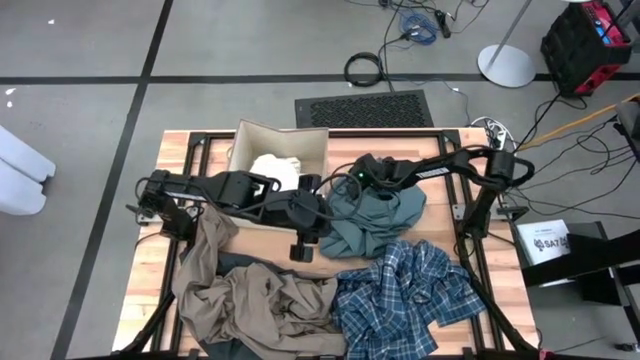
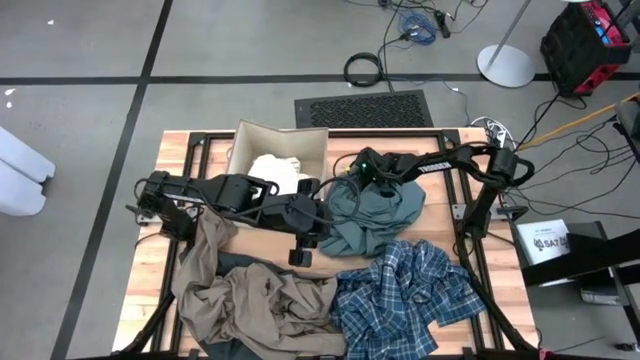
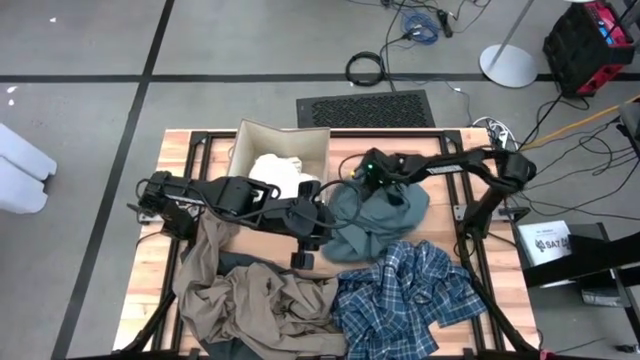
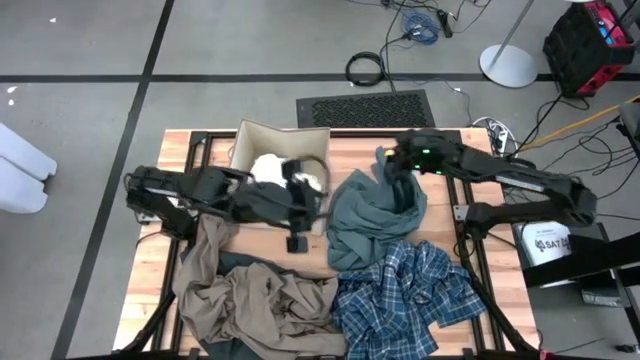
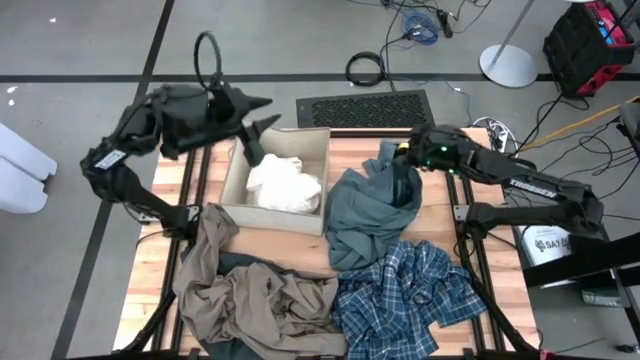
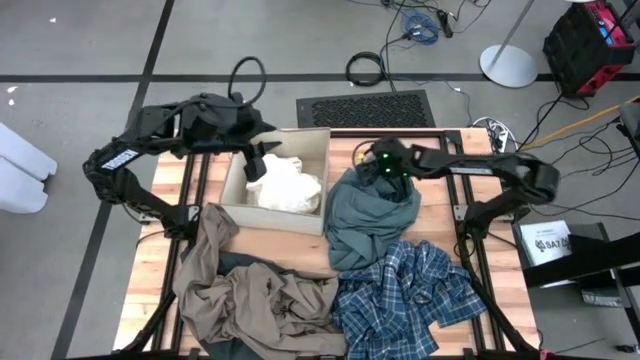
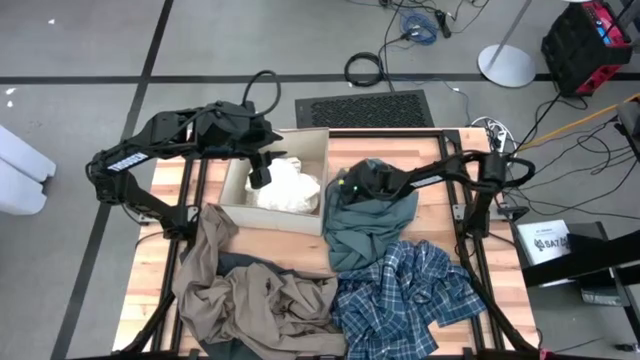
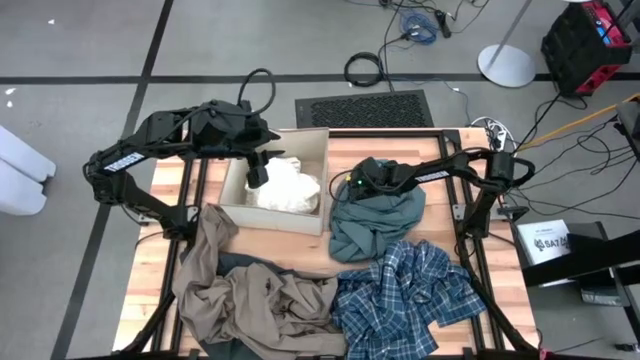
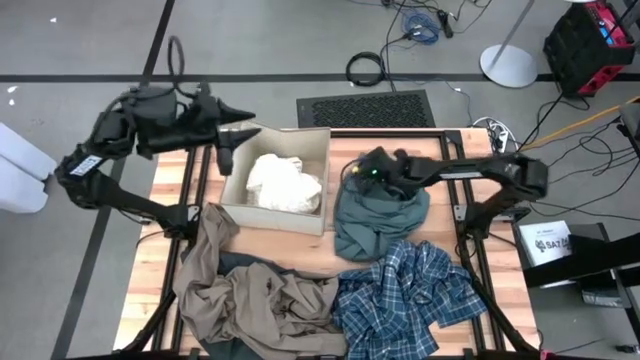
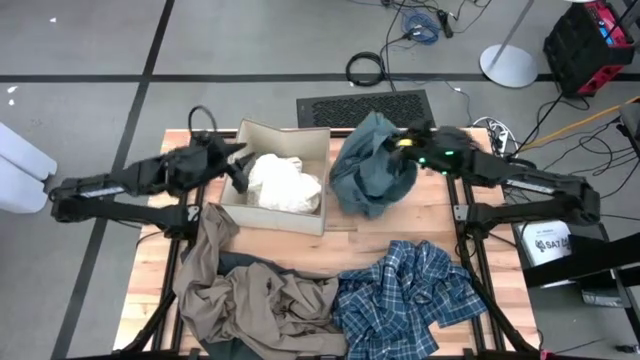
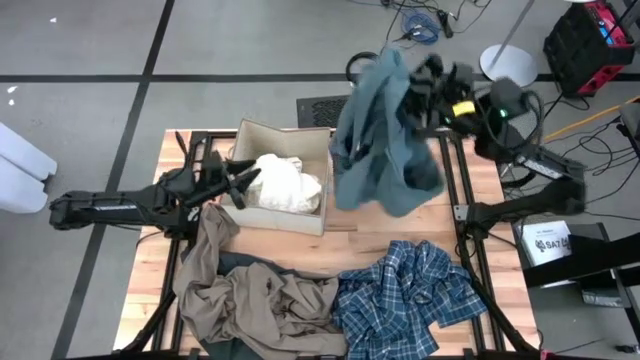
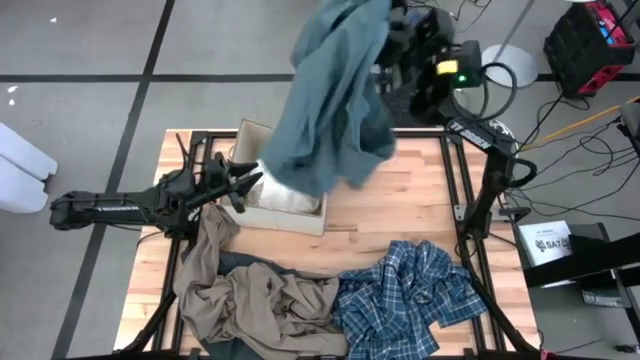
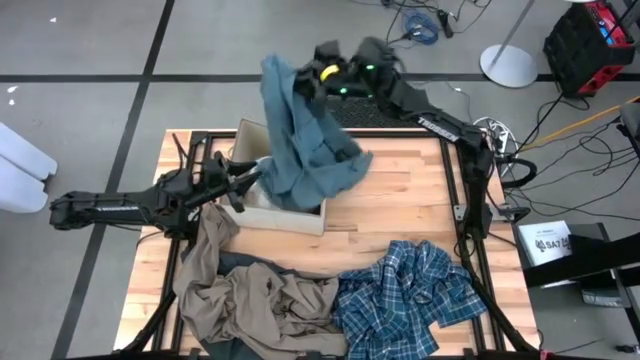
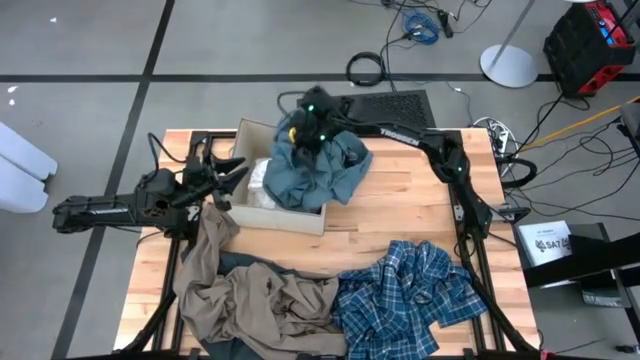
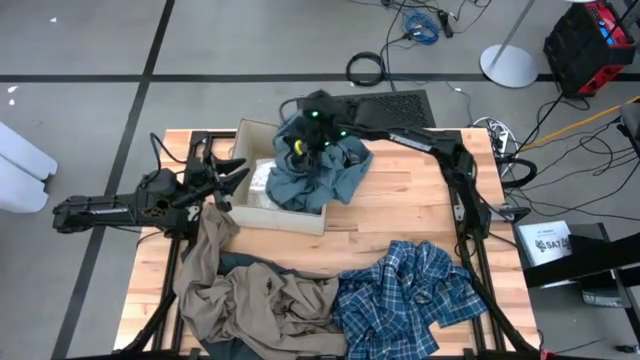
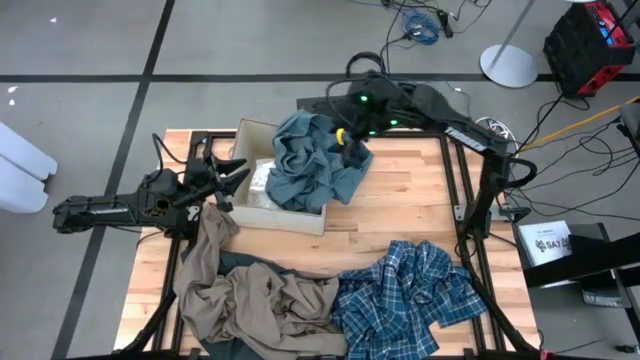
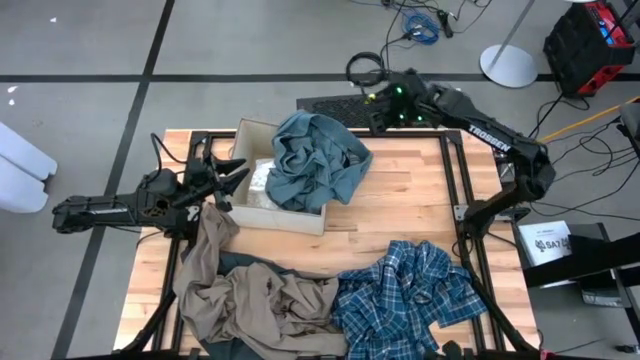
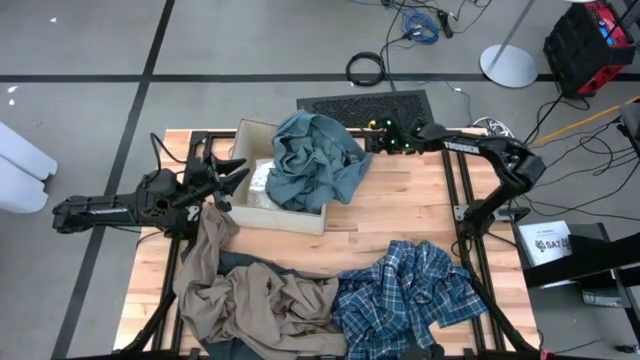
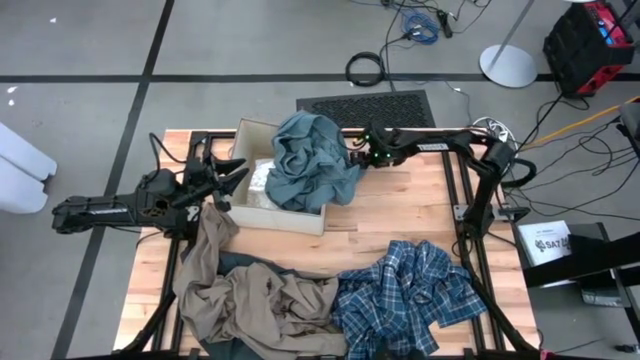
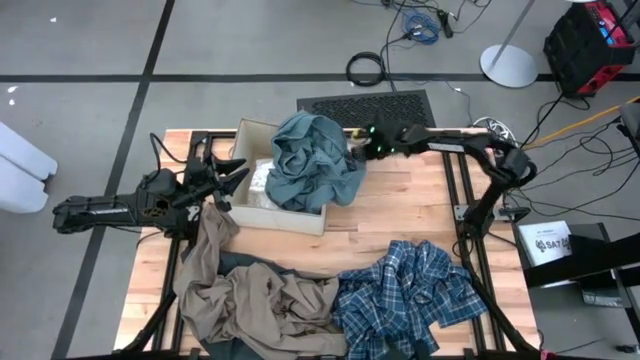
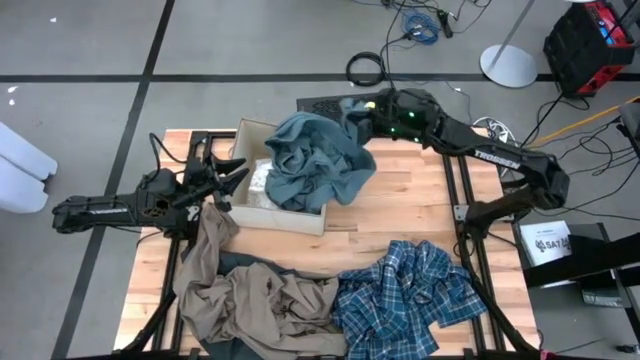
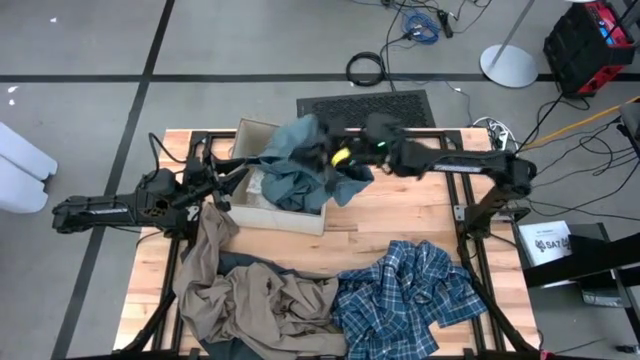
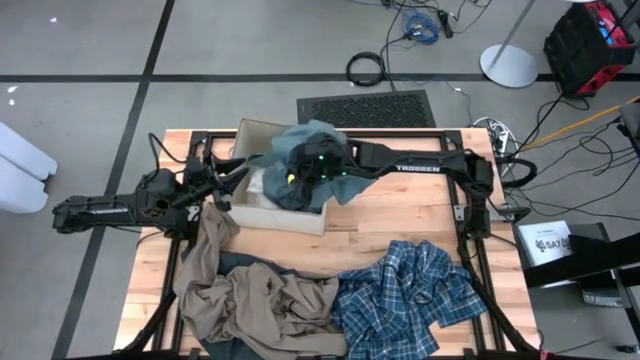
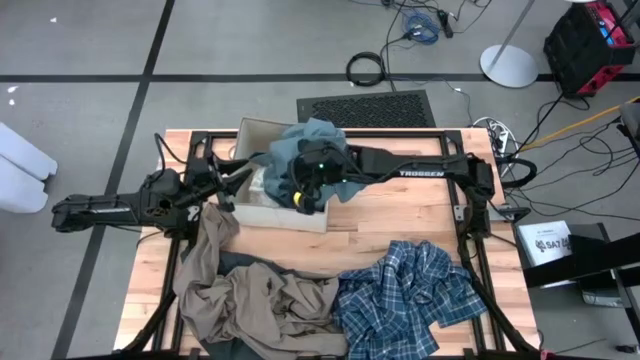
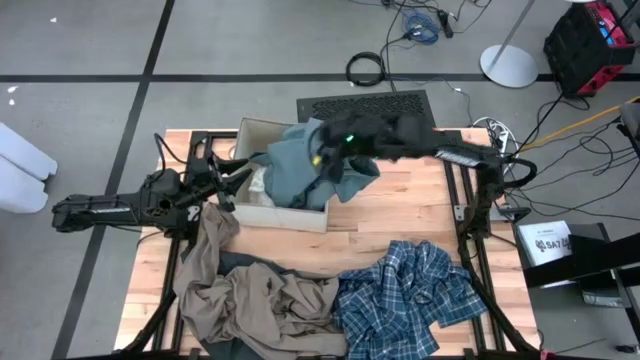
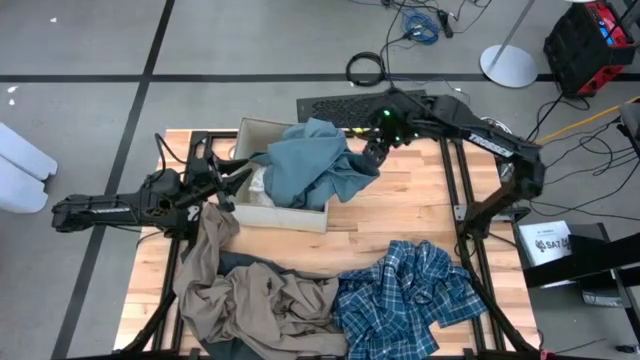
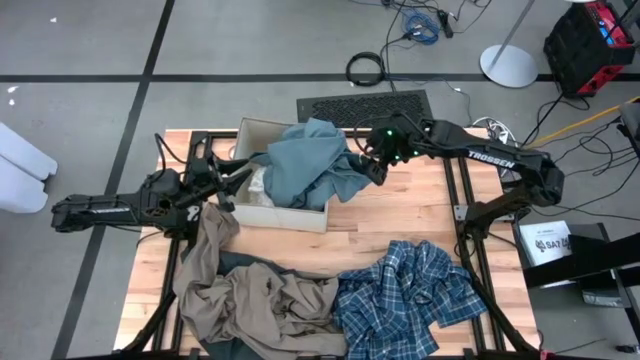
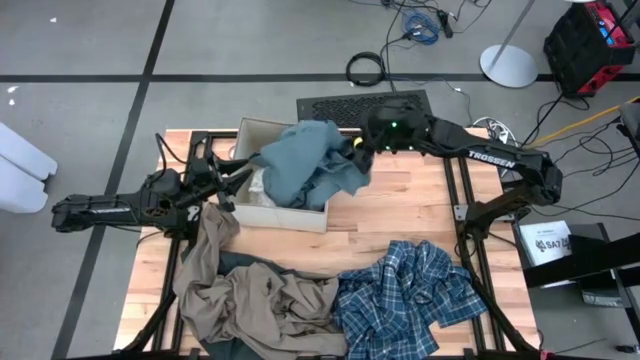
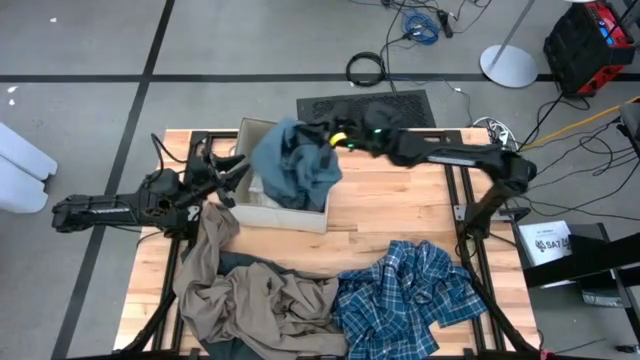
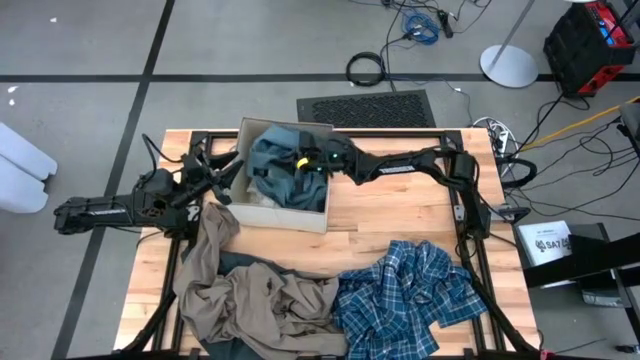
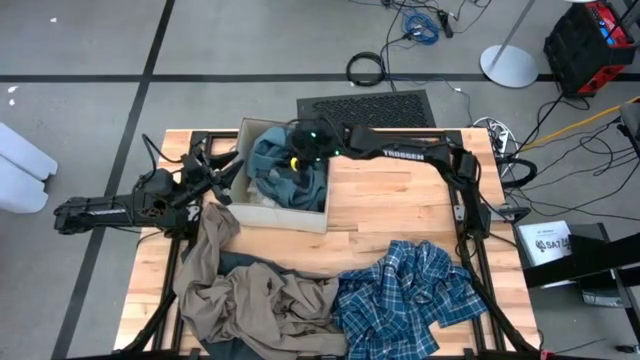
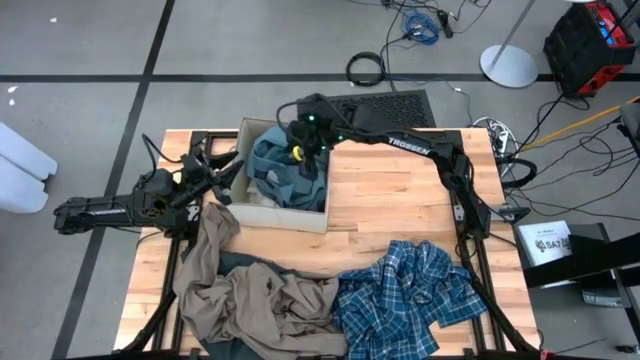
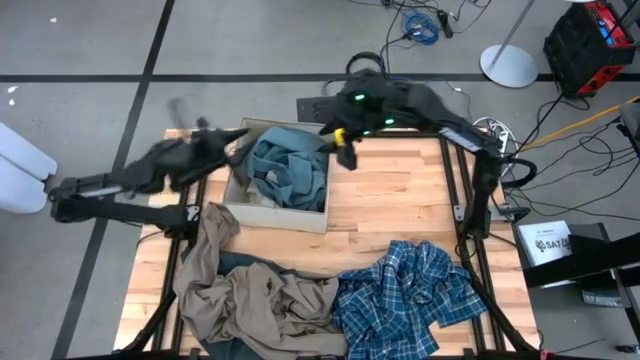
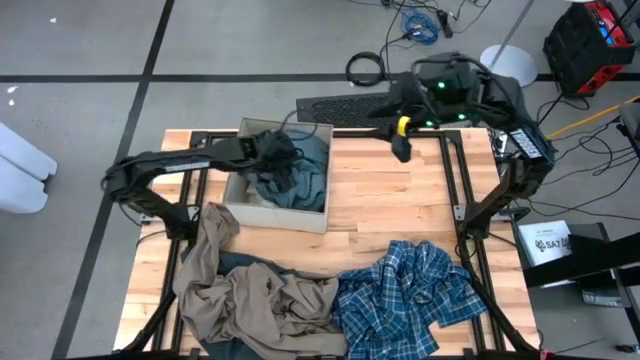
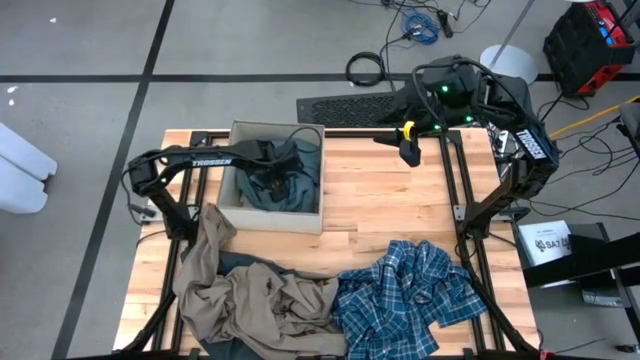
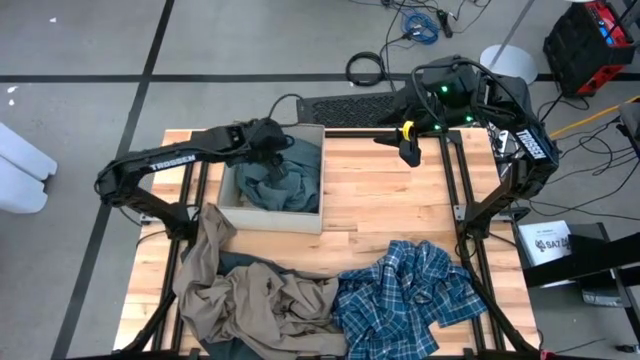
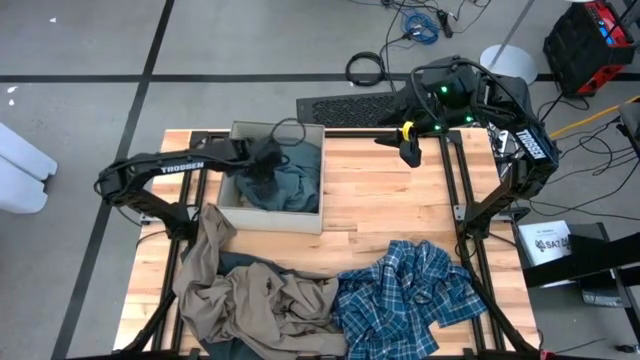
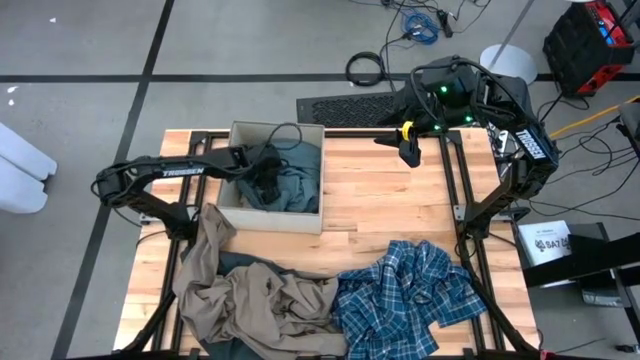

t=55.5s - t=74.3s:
Task: Sort clothes
Put the gray jeans into the white laundry bin
